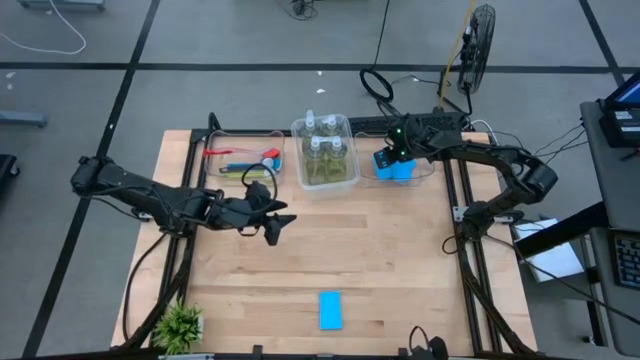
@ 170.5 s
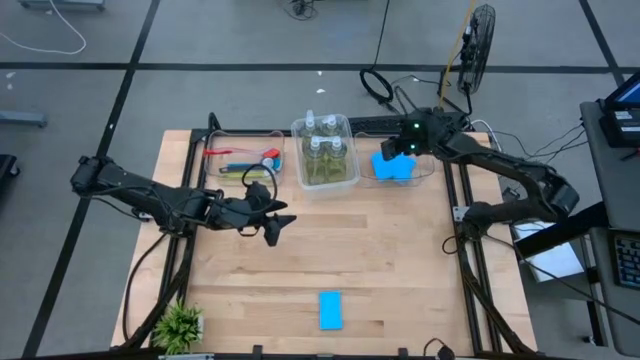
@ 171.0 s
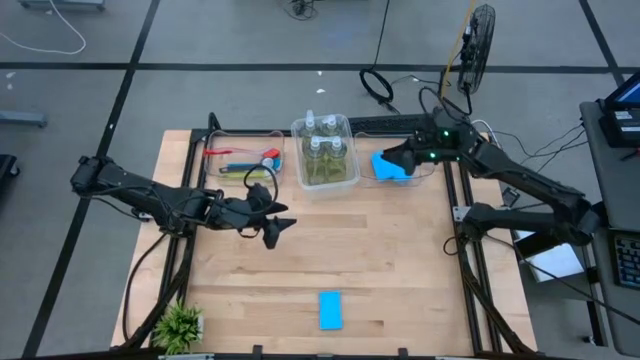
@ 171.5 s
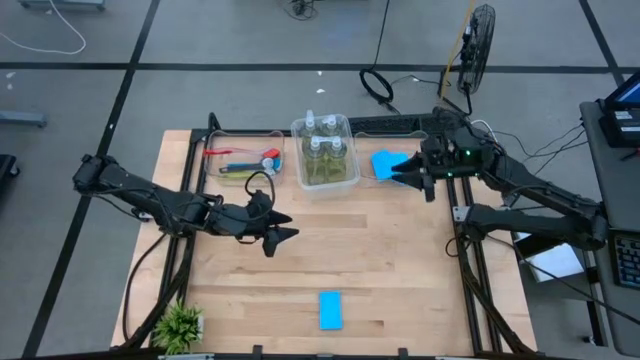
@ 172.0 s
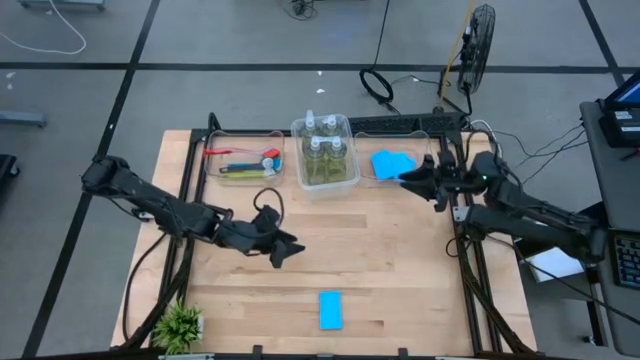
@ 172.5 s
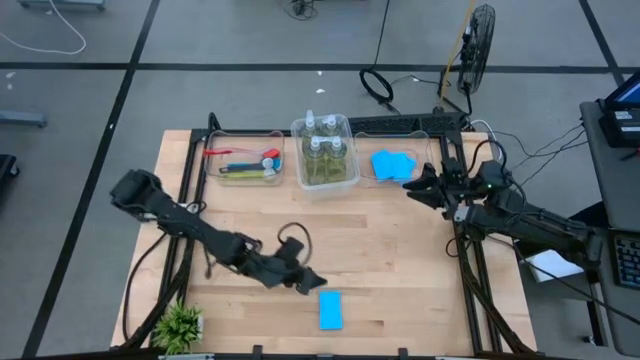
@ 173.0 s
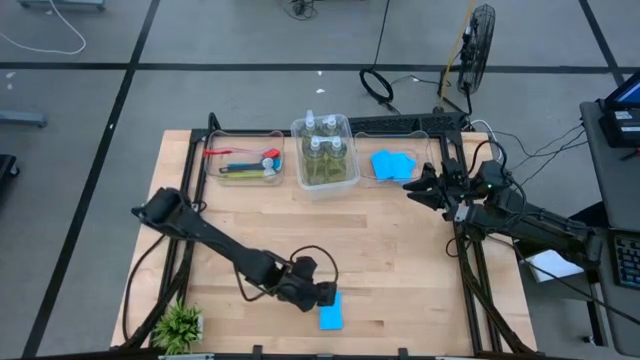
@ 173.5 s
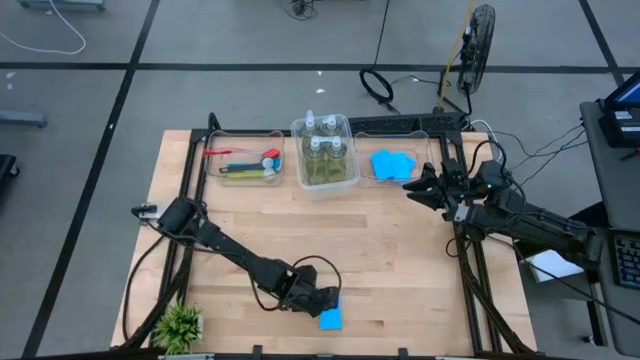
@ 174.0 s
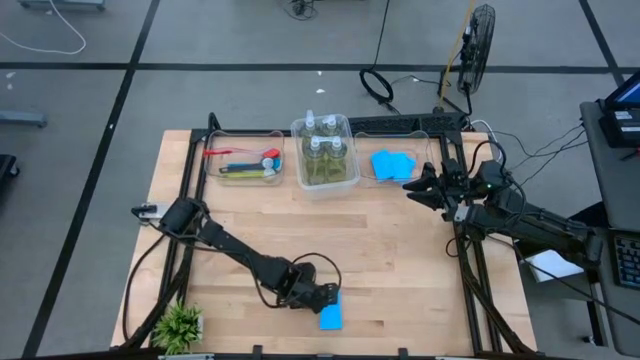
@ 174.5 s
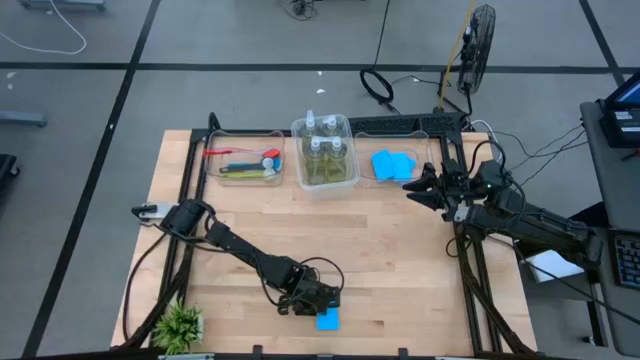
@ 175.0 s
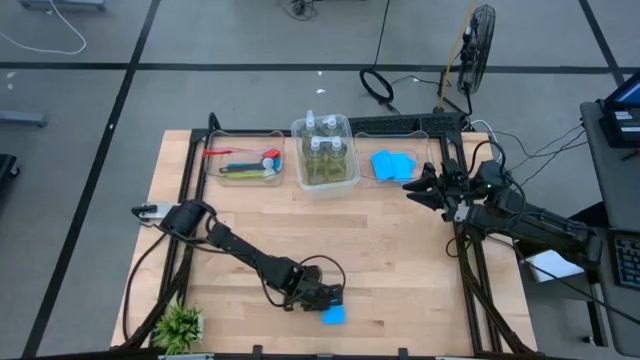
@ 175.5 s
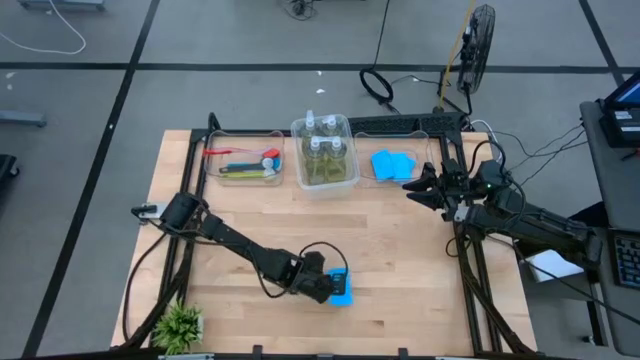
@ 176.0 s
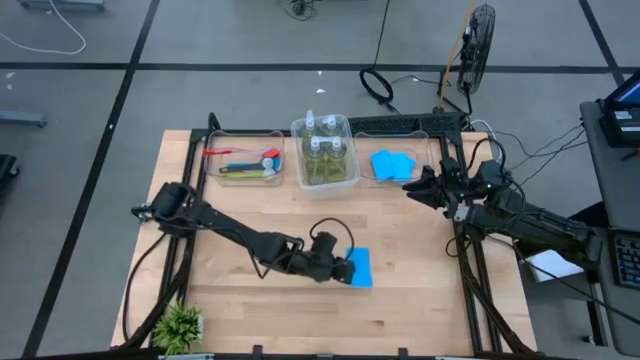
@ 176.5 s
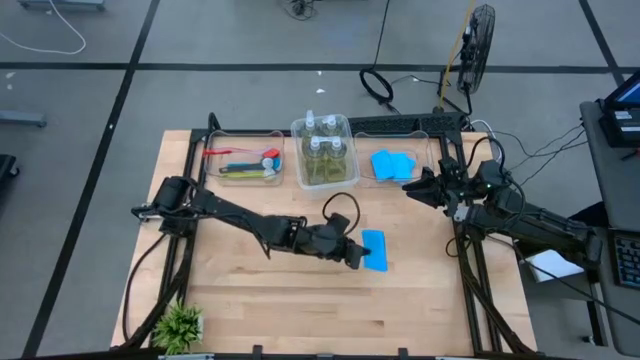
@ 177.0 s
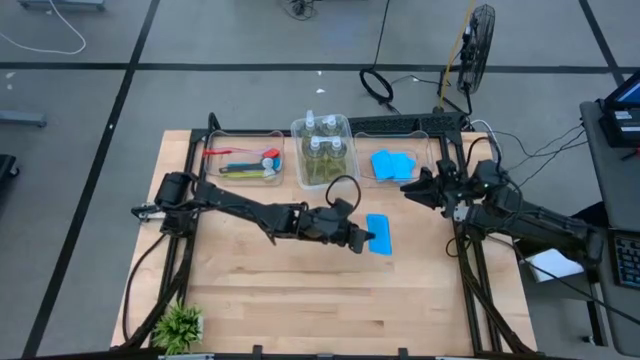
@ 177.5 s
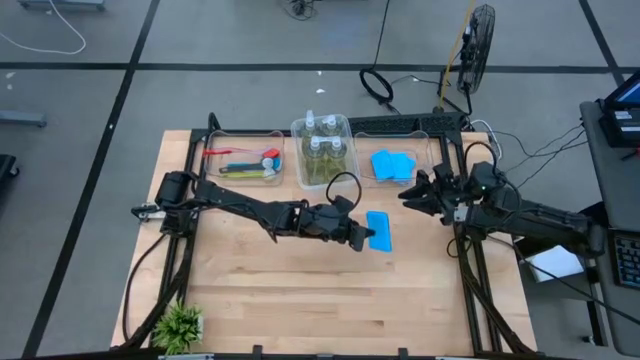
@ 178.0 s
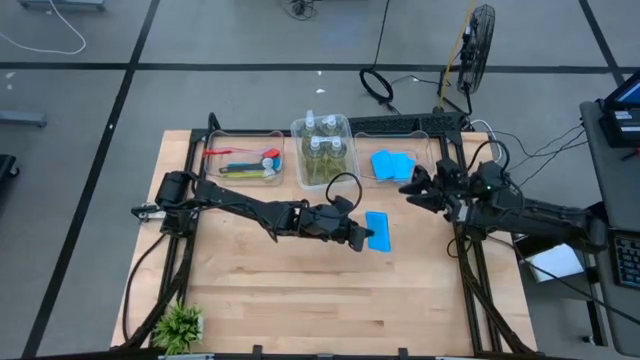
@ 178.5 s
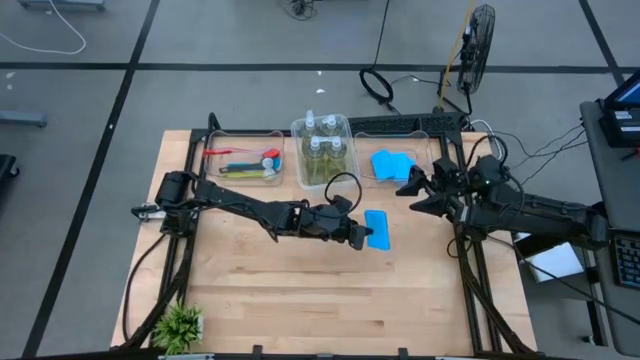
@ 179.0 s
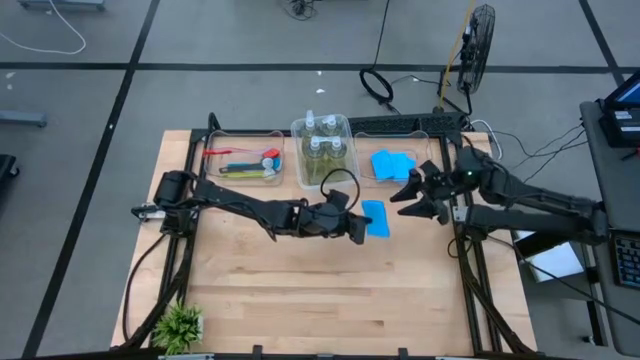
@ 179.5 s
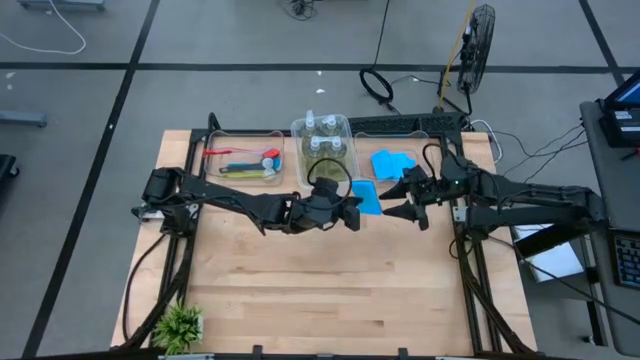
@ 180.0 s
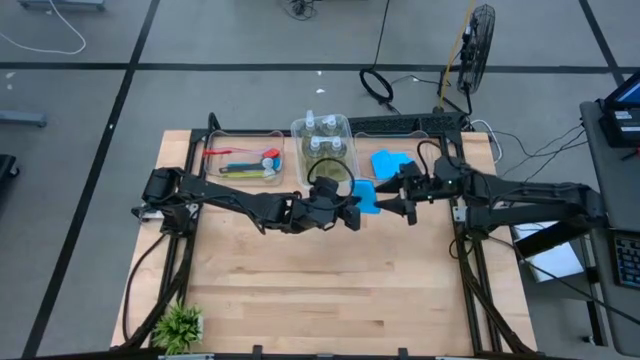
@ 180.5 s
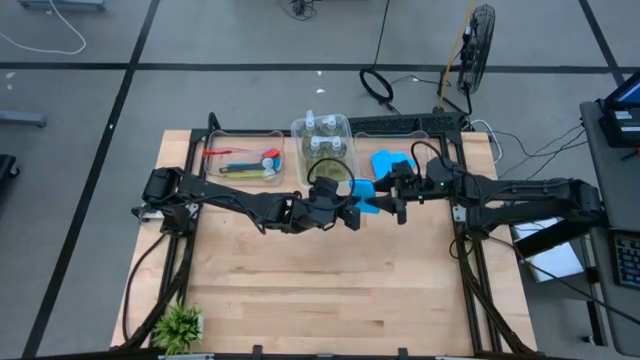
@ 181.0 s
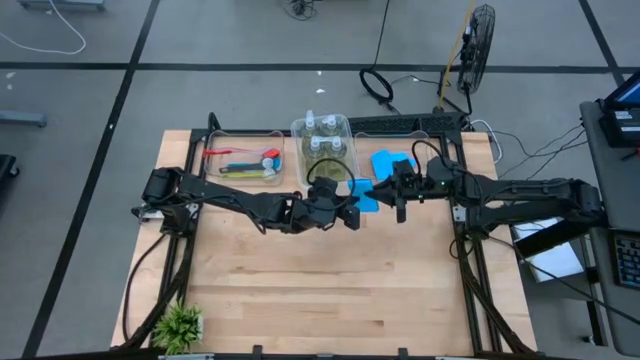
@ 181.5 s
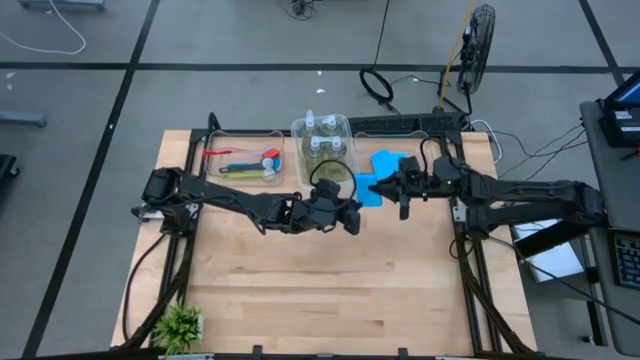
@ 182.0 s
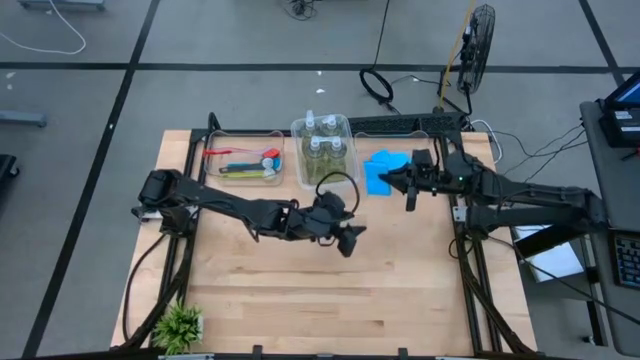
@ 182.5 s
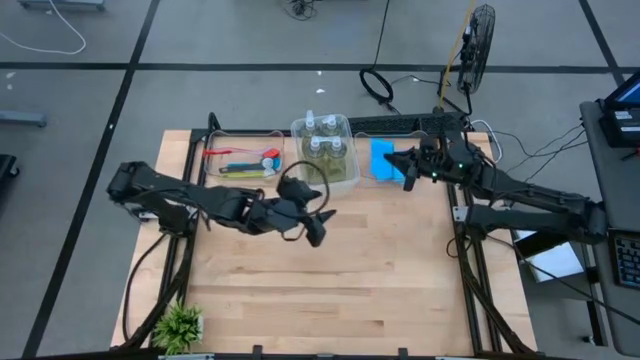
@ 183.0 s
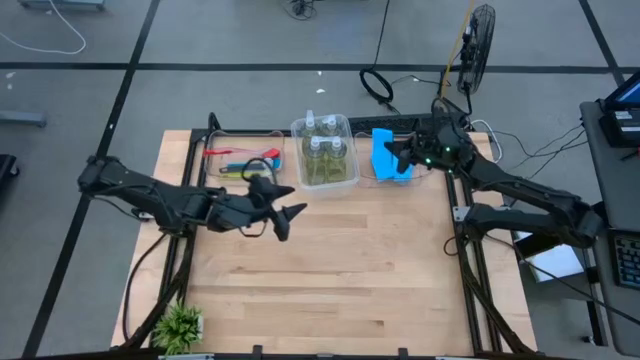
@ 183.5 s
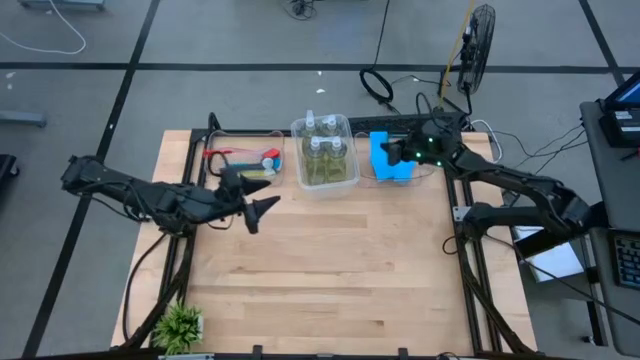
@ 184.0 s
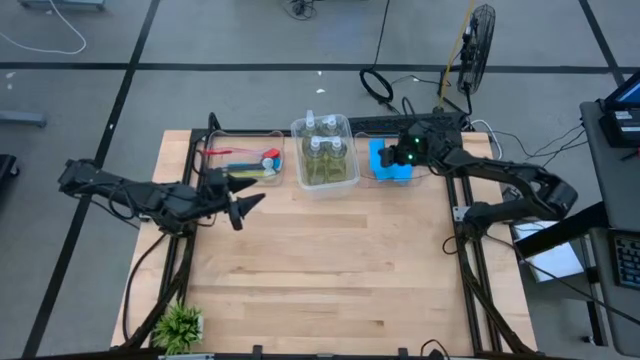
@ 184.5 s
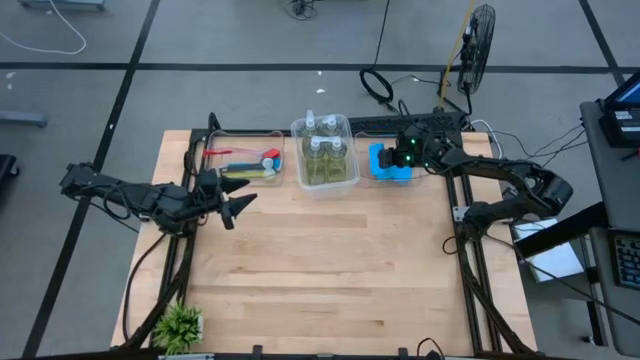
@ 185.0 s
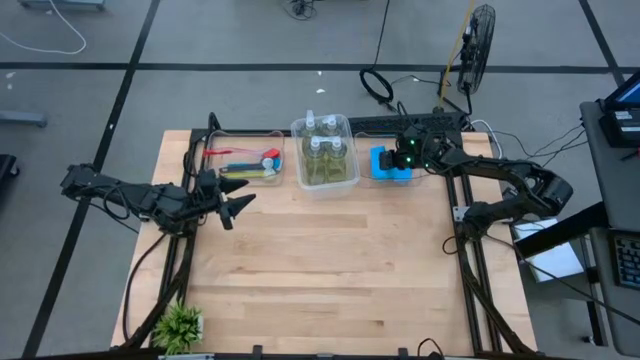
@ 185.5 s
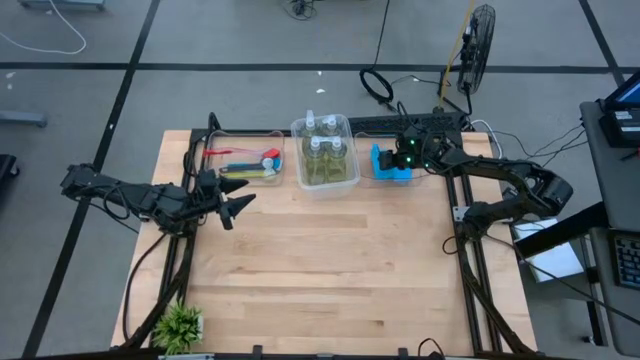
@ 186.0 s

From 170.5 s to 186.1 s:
Task: Pick & Place Kitchen Sink Supplies
Put the blue sponge into the right transparent bin

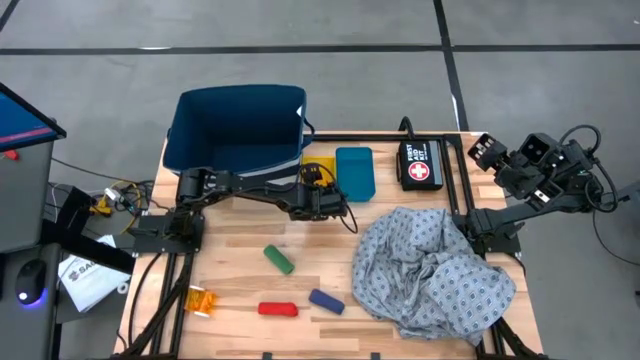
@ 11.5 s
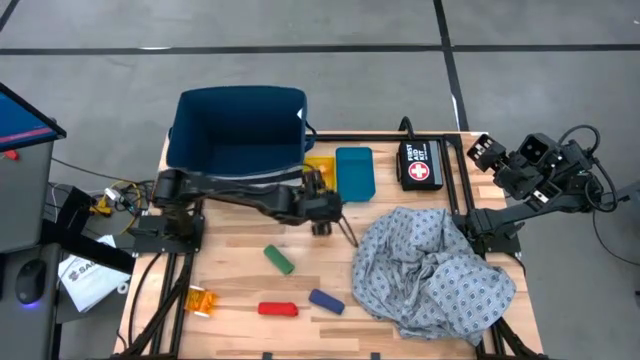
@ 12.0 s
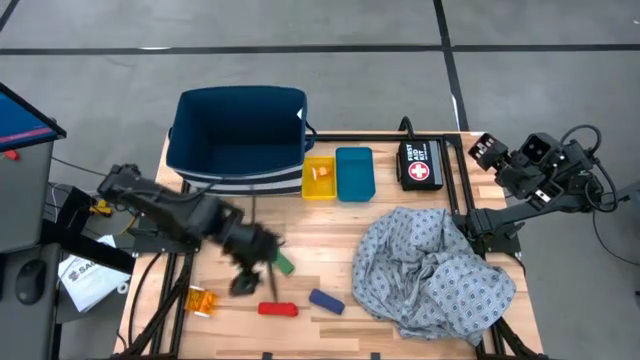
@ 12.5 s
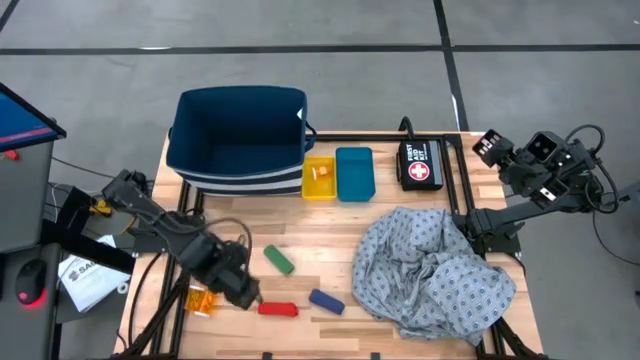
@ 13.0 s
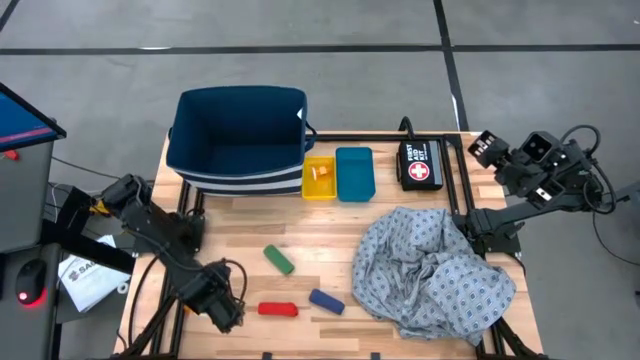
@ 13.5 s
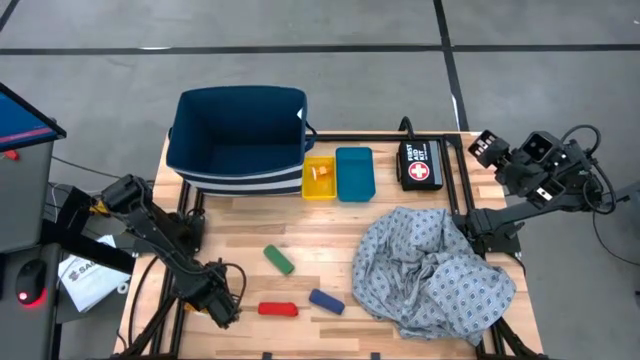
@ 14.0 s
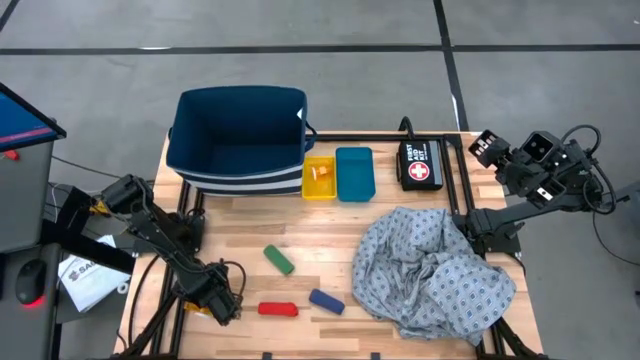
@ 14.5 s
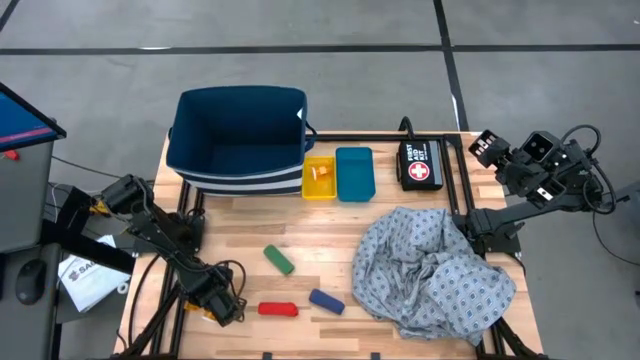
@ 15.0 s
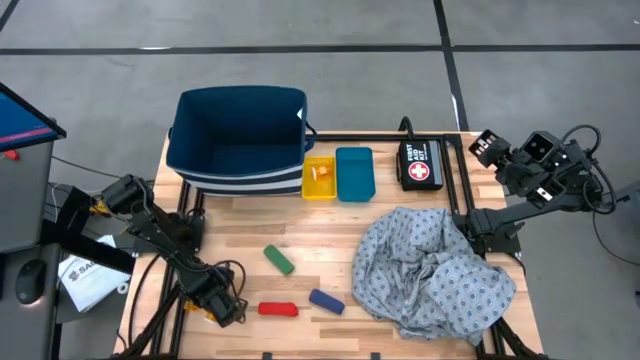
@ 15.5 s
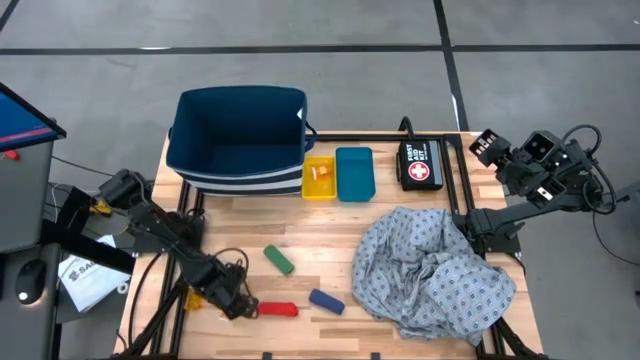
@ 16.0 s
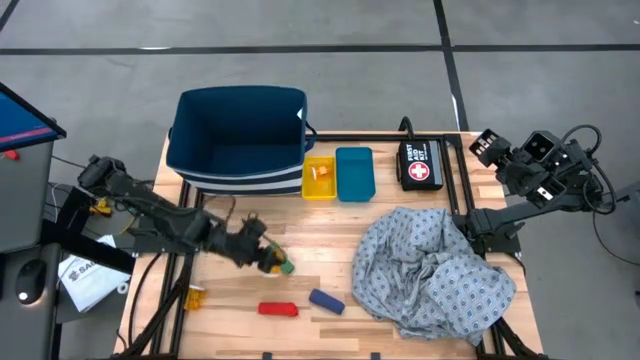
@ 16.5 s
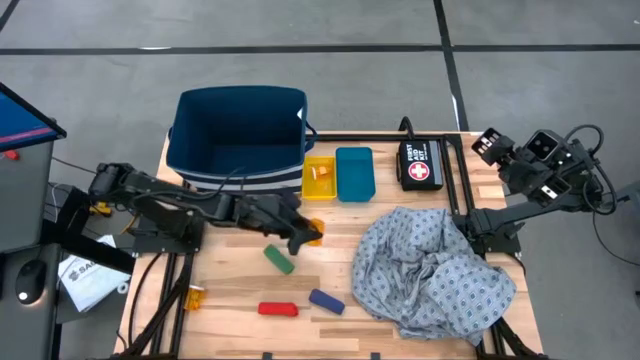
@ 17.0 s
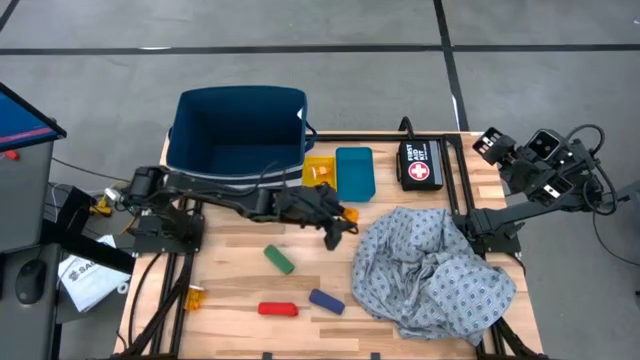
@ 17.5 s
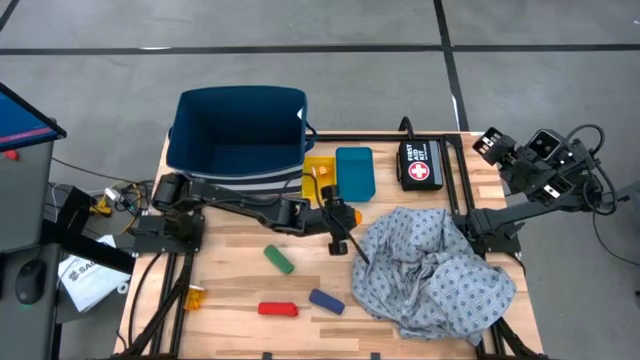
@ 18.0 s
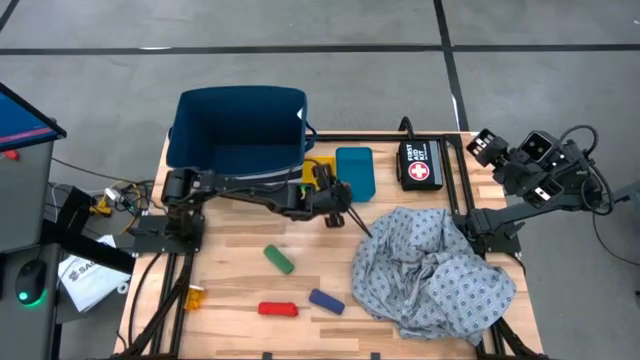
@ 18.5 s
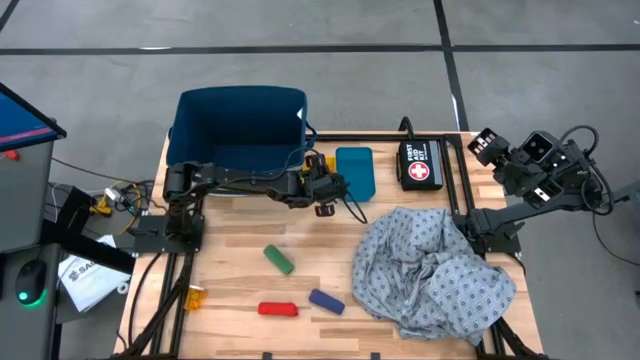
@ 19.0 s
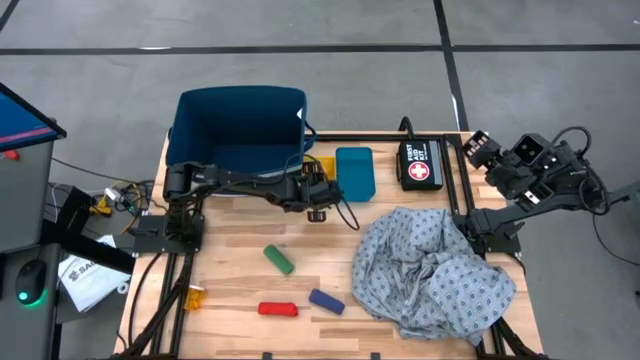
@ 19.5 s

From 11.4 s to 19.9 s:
Task: Pick & place medical supplies in basket/bin
Put the right orange pill bottle into the yellow basket
